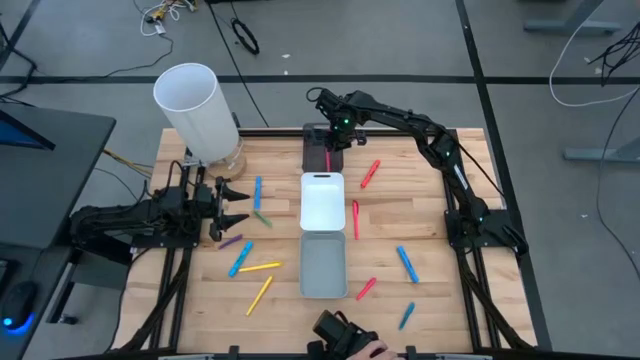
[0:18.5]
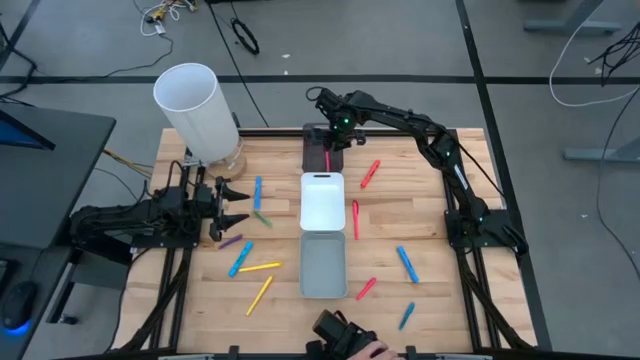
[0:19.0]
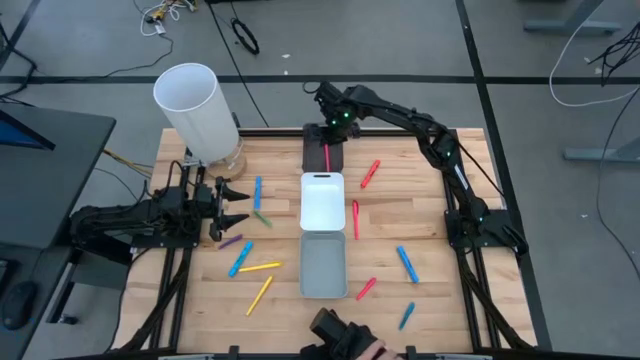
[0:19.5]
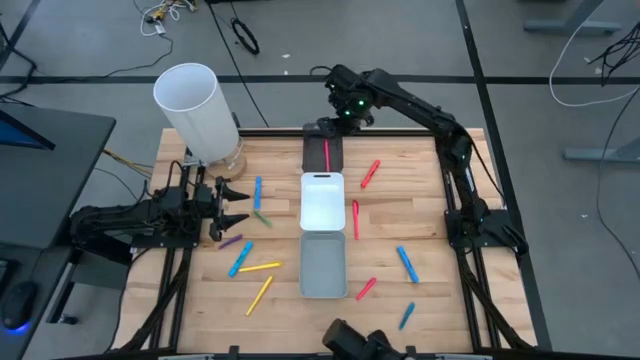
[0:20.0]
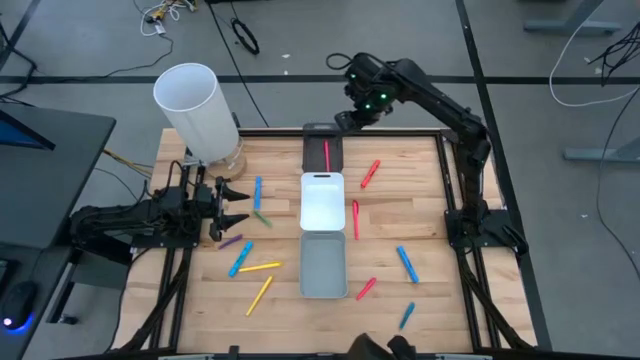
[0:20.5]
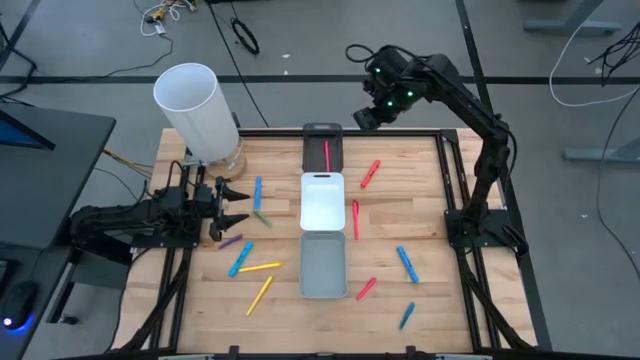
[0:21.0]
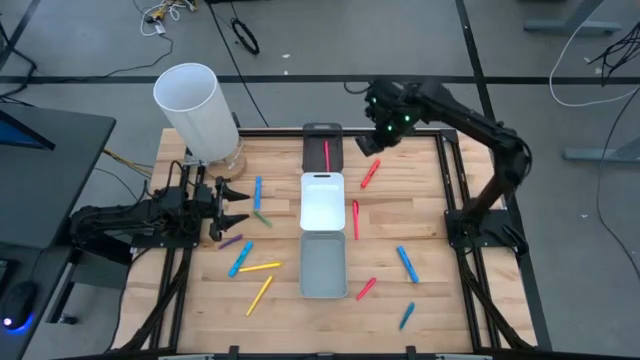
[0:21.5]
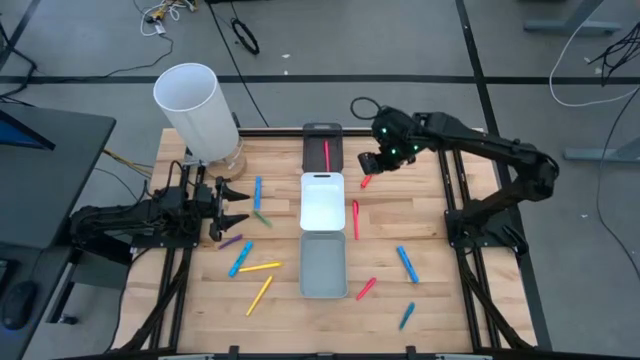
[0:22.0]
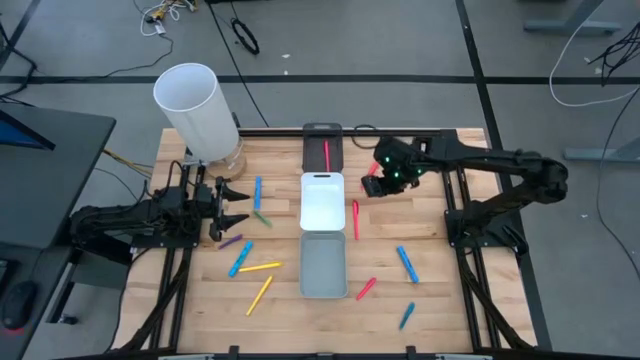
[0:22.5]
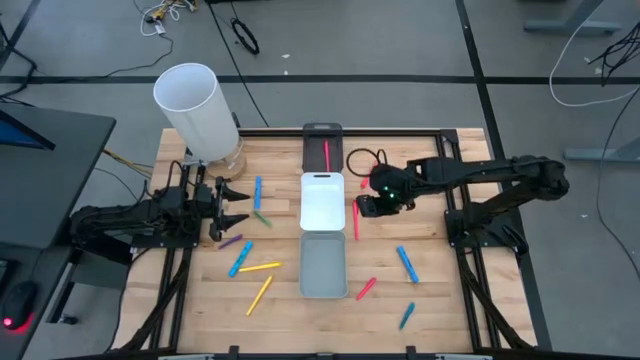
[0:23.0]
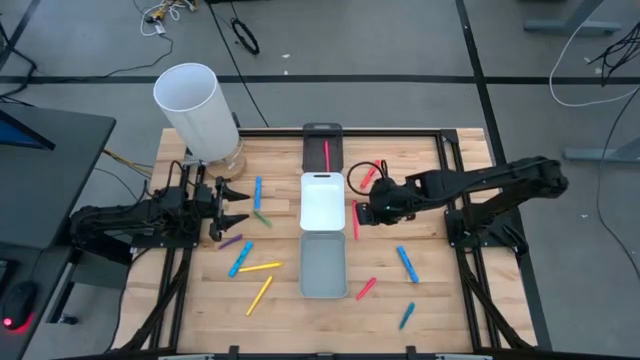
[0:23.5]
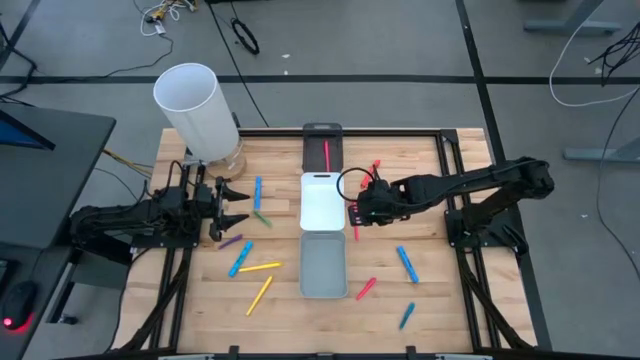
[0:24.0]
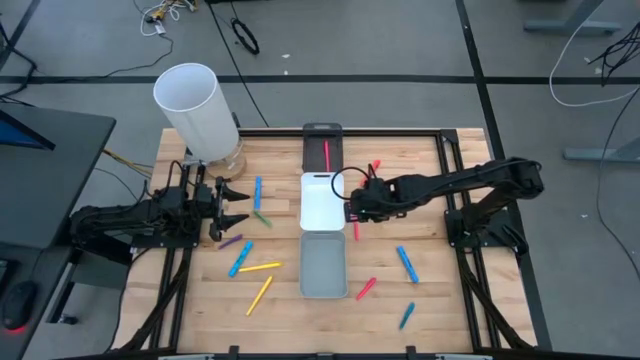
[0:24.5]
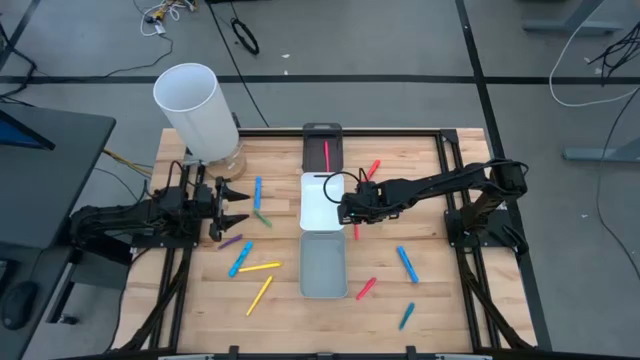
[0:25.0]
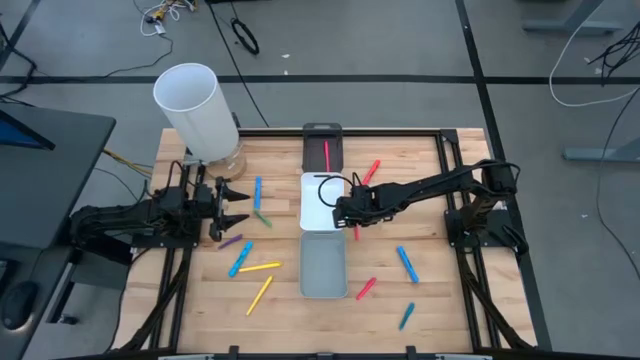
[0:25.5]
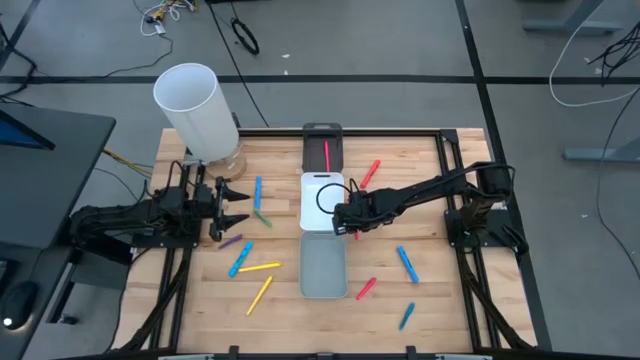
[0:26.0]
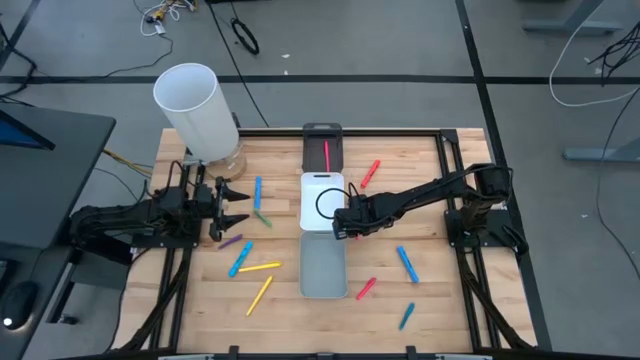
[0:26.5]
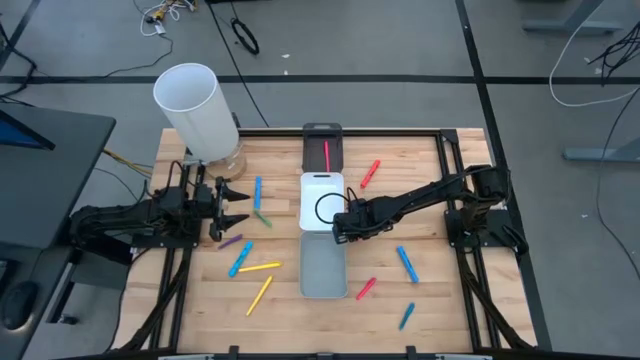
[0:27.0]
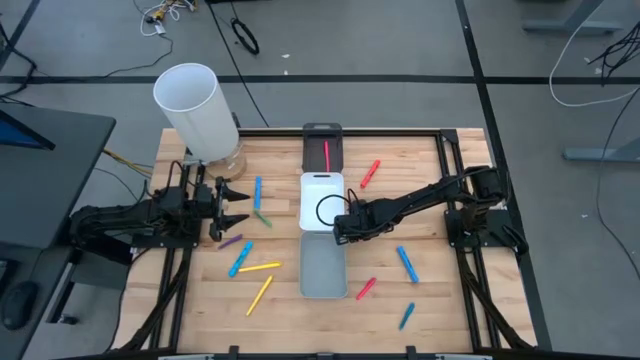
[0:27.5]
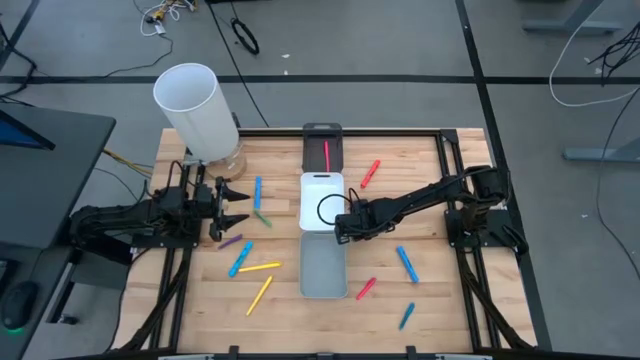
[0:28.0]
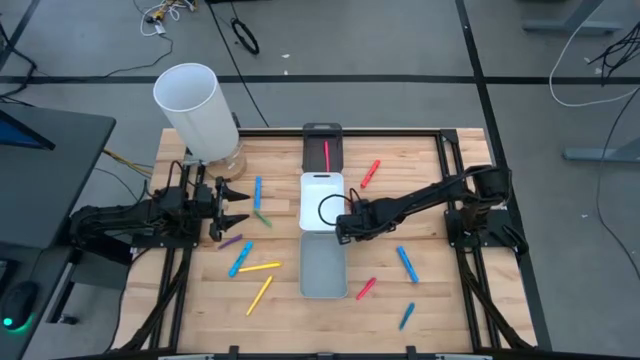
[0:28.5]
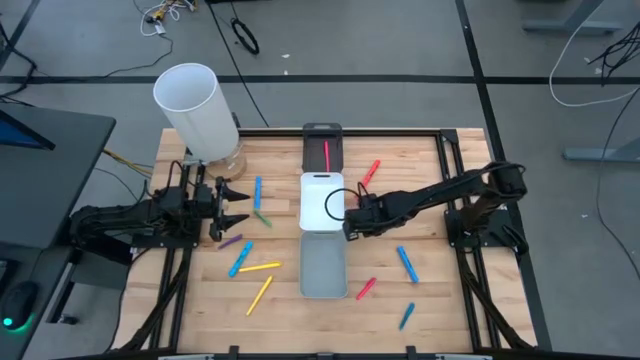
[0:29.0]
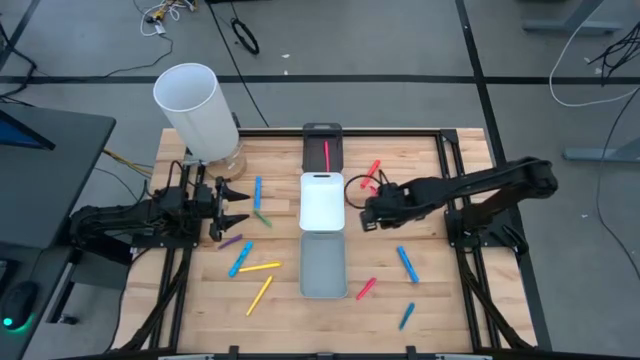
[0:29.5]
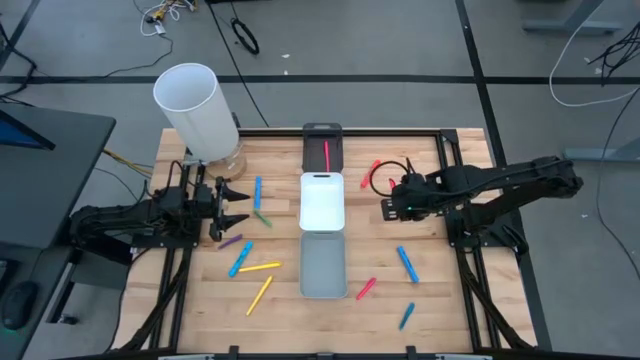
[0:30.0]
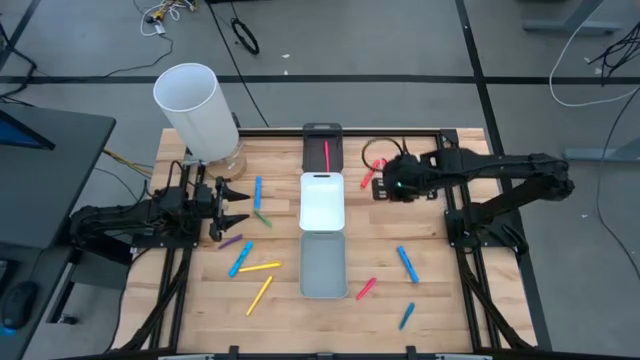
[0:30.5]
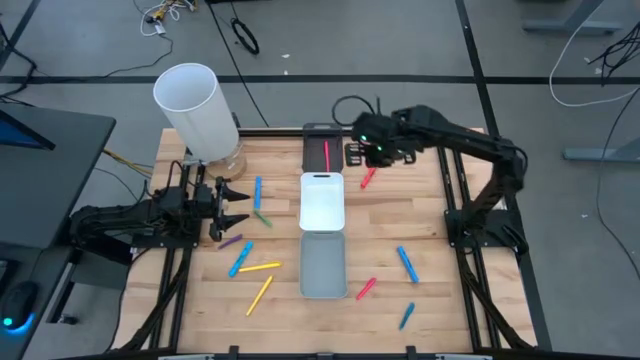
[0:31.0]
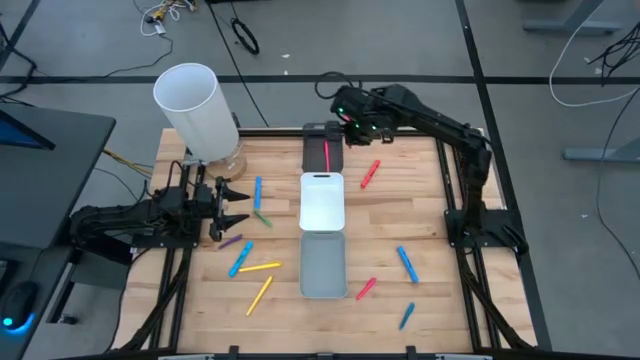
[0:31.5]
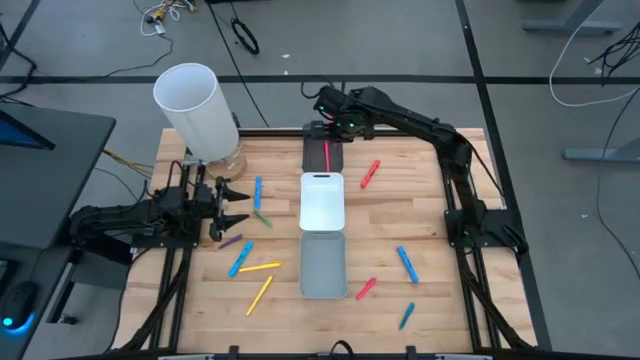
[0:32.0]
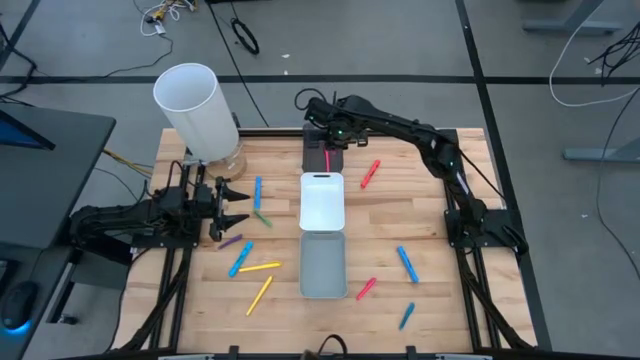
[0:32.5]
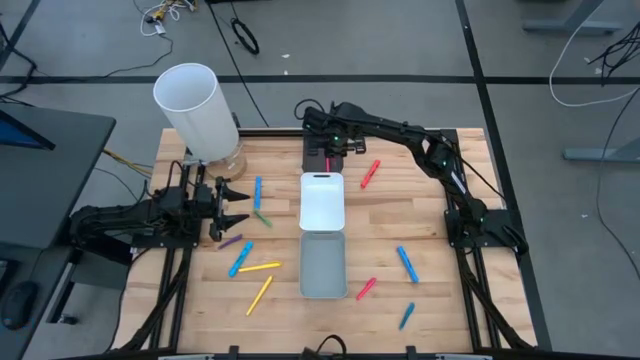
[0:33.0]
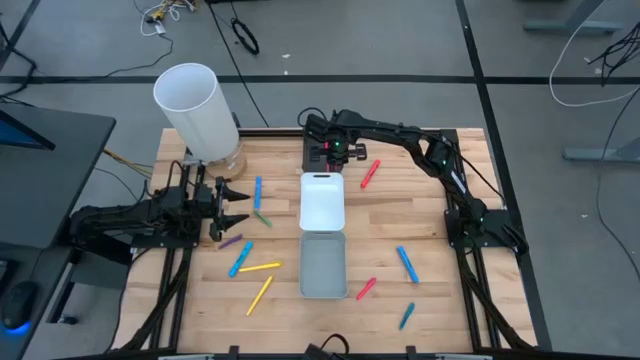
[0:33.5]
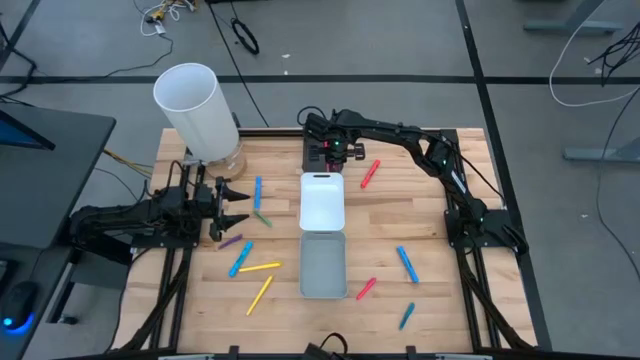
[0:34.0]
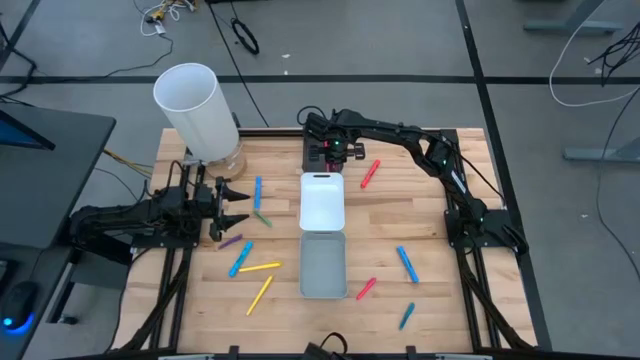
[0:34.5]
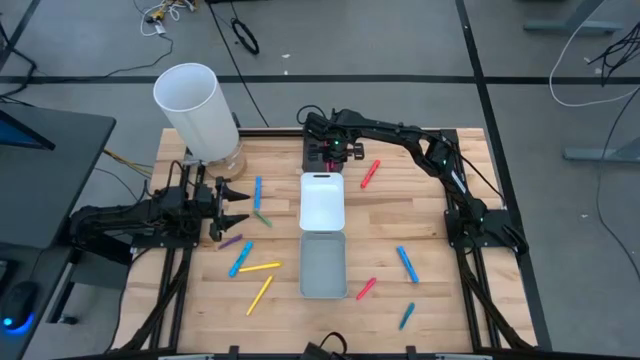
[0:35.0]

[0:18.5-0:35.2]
Task: Pick & Place Markers
Put the large pink pen into the black bin
